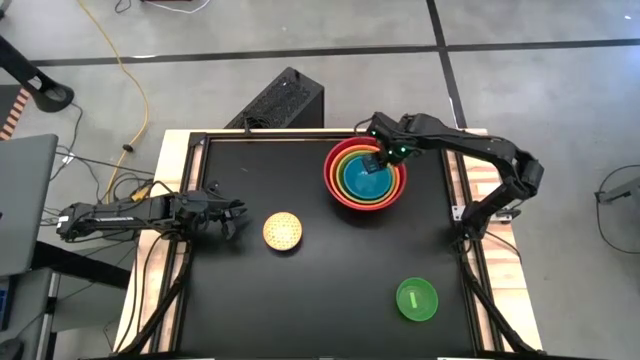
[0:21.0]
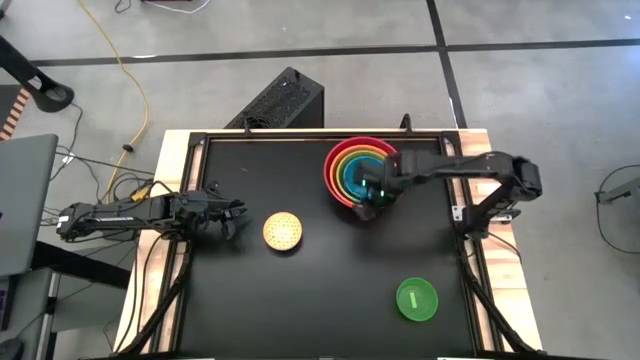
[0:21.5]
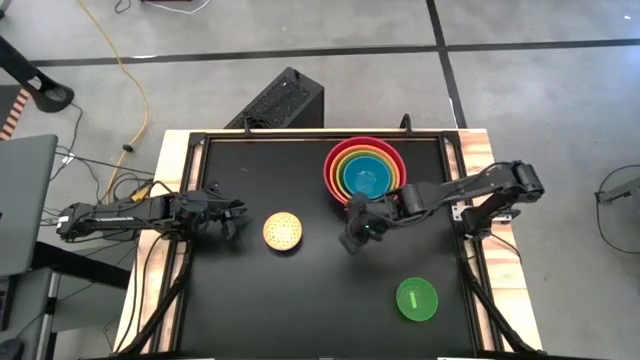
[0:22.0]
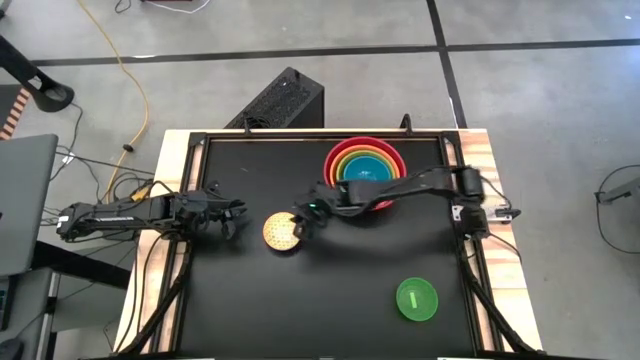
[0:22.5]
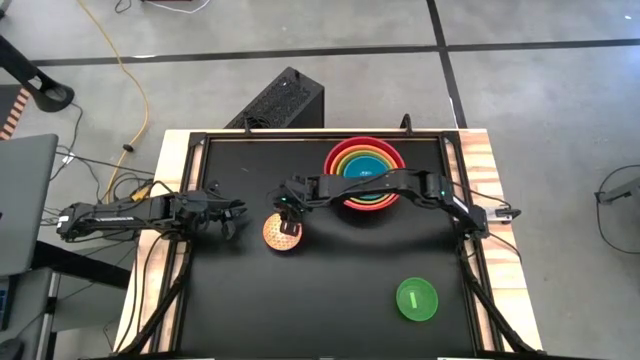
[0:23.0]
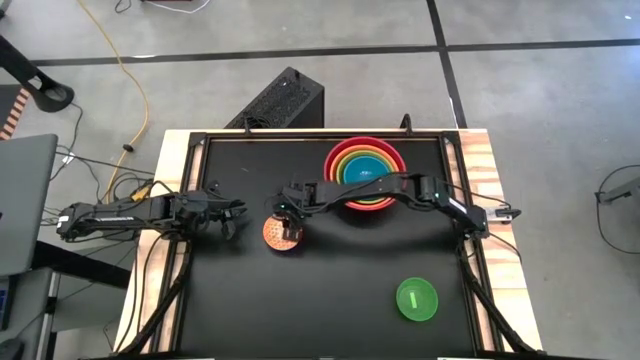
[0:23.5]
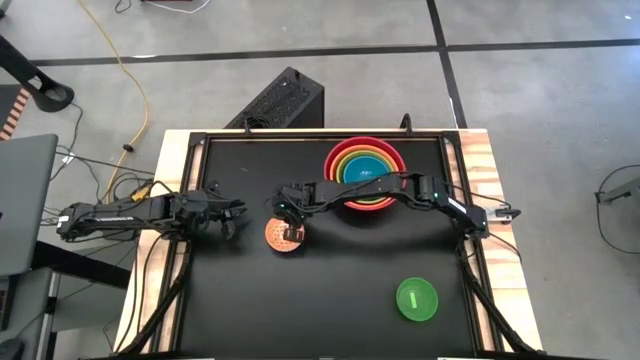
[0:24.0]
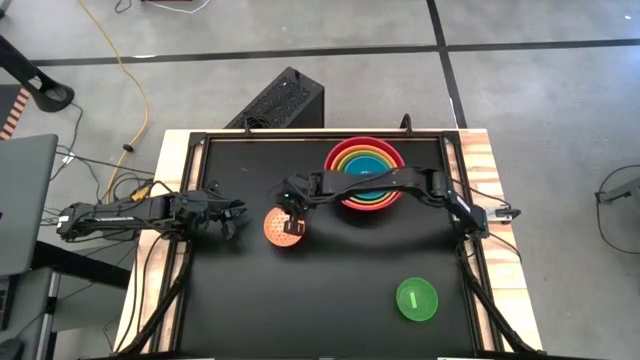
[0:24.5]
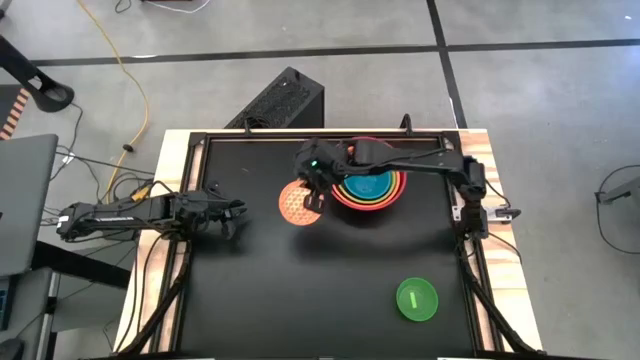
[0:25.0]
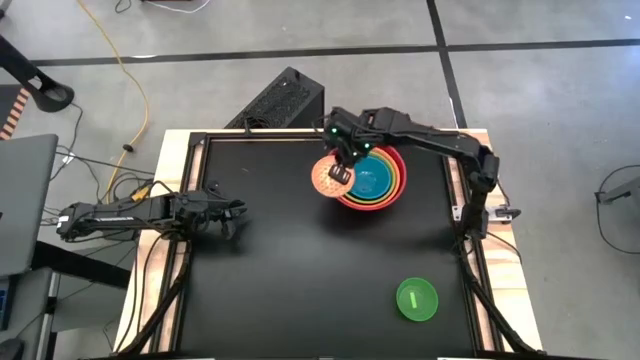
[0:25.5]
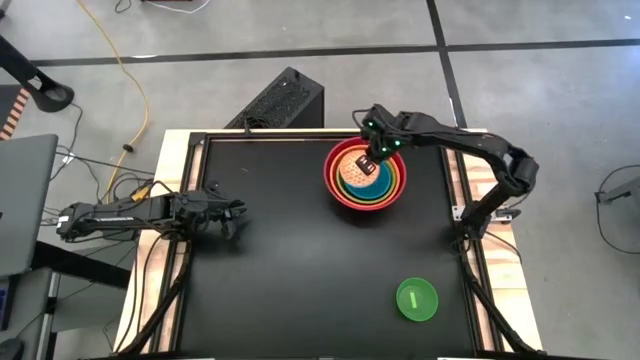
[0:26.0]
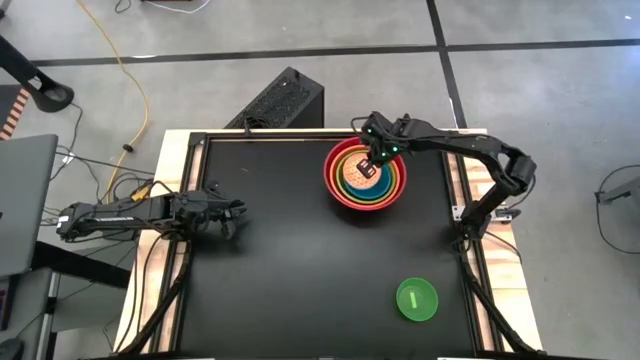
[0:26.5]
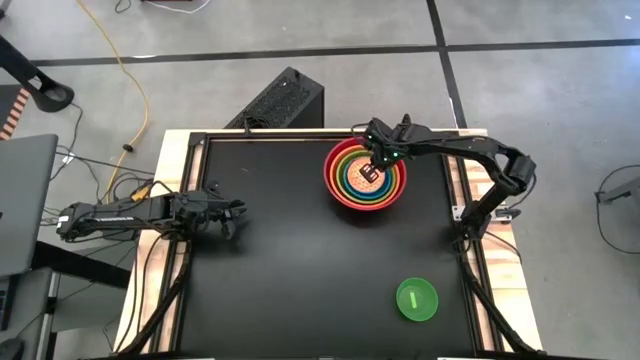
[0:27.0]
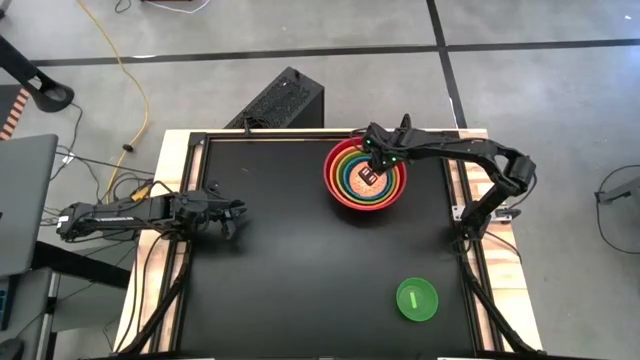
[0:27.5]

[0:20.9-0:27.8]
Stack the orange-patterned bowl on the blue bowl

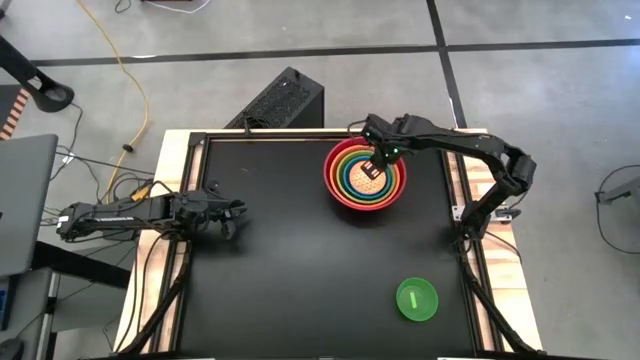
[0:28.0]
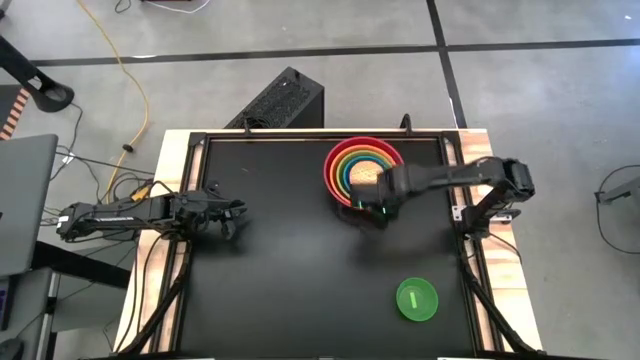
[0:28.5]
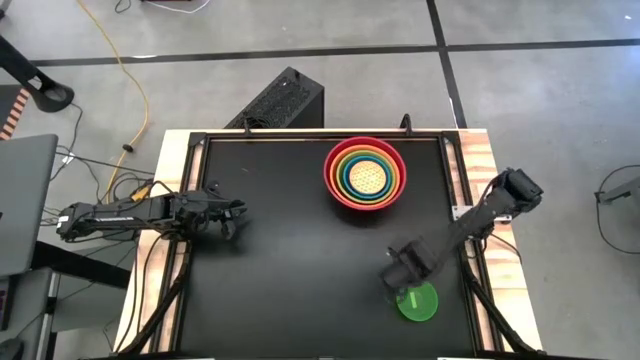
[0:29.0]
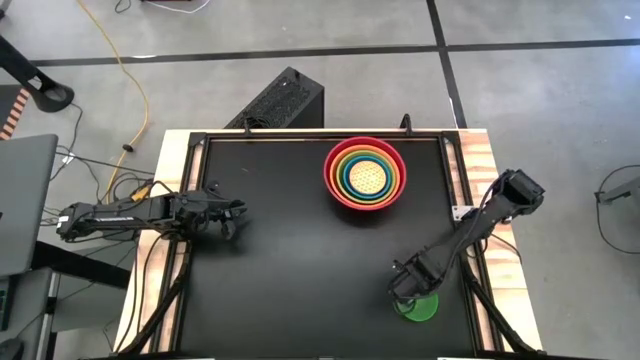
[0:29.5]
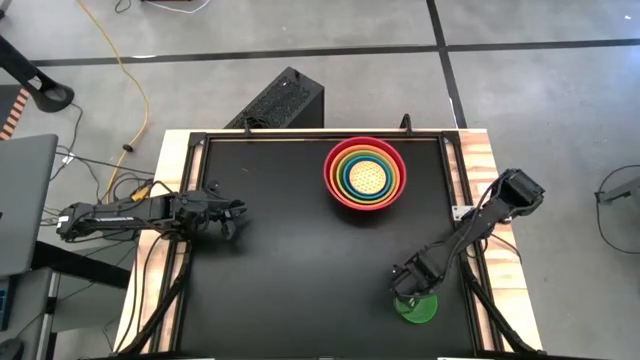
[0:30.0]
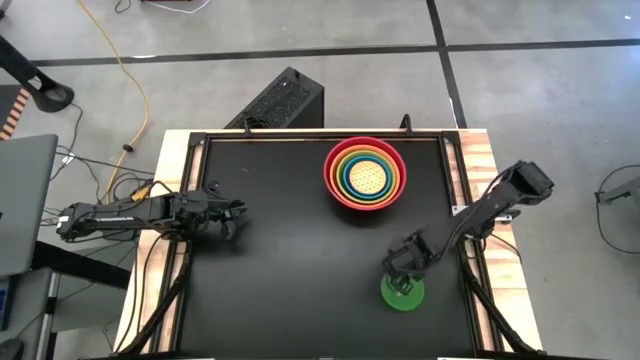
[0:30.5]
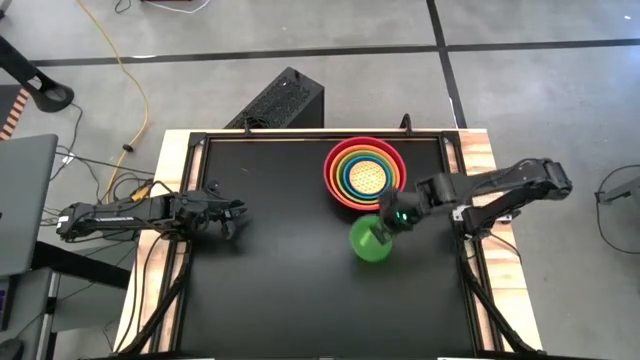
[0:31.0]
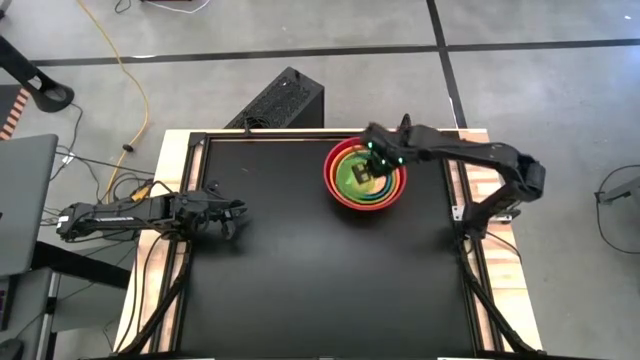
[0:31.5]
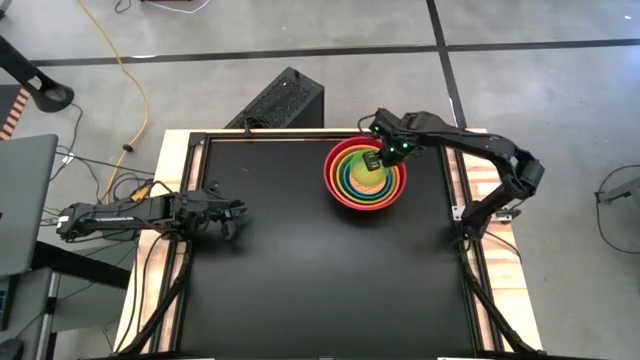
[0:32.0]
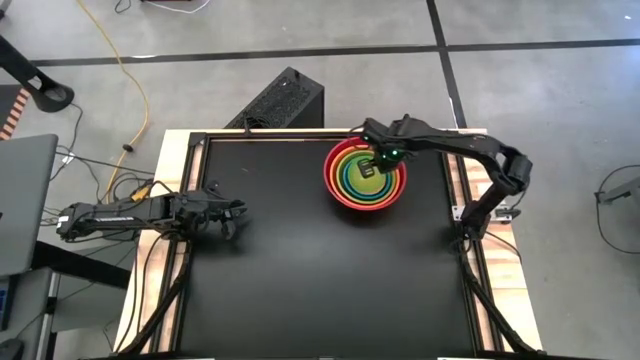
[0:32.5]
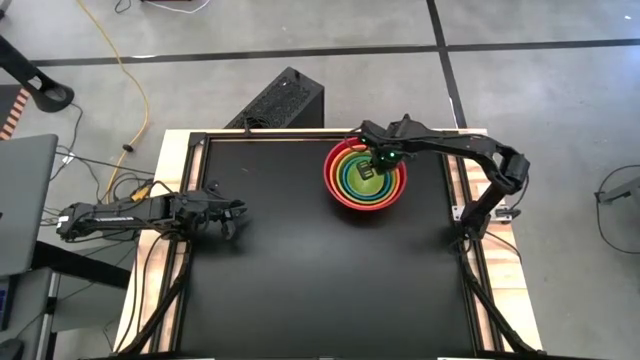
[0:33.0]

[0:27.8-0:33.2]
Stack the green bowl on the orange-patterned bowl

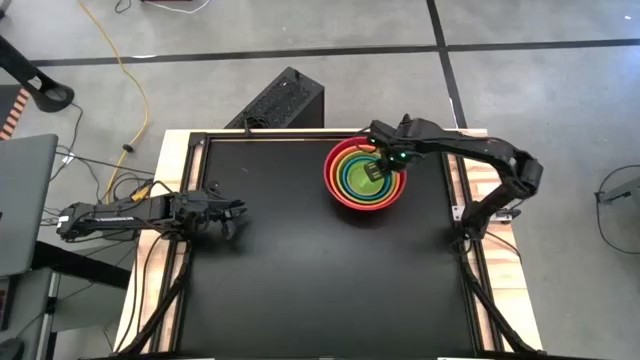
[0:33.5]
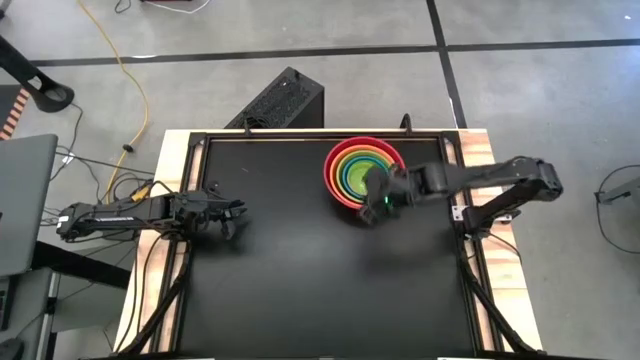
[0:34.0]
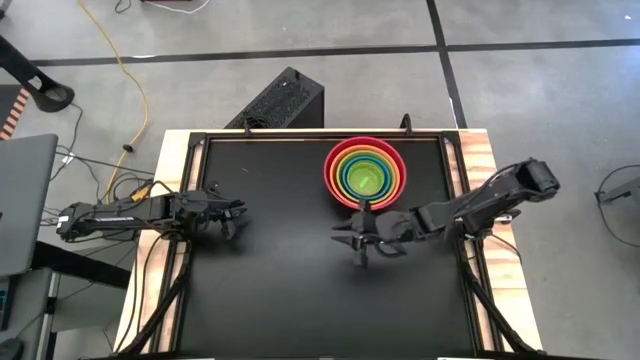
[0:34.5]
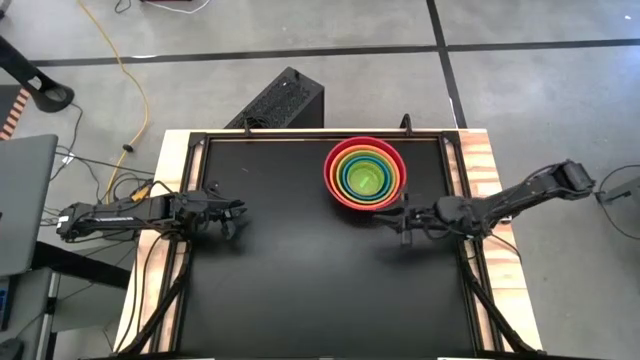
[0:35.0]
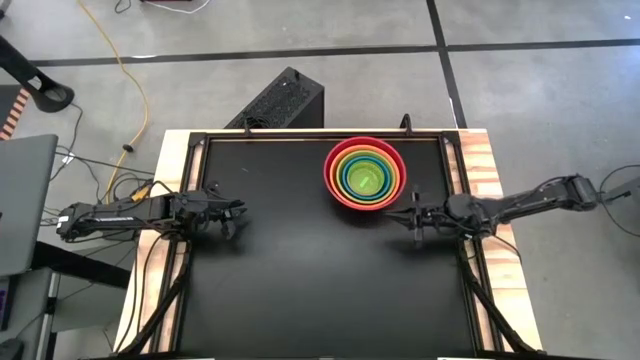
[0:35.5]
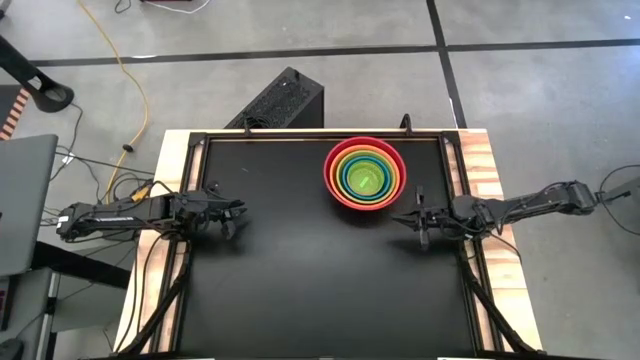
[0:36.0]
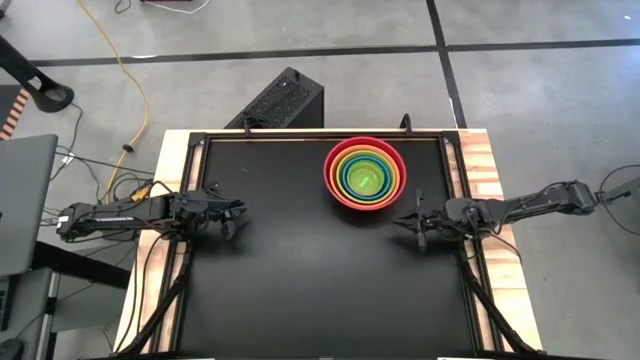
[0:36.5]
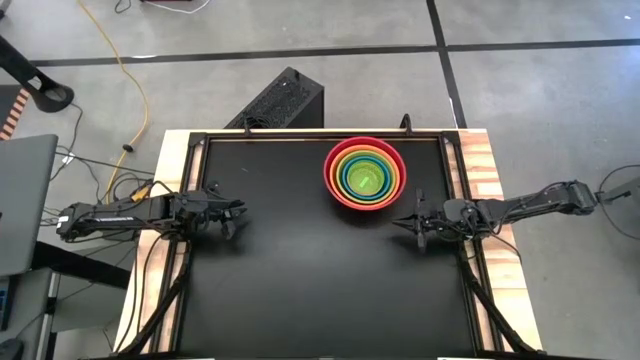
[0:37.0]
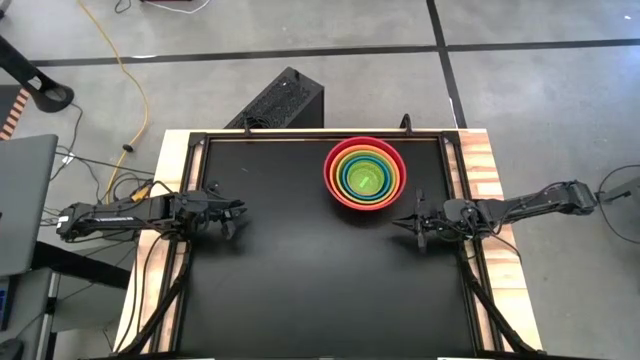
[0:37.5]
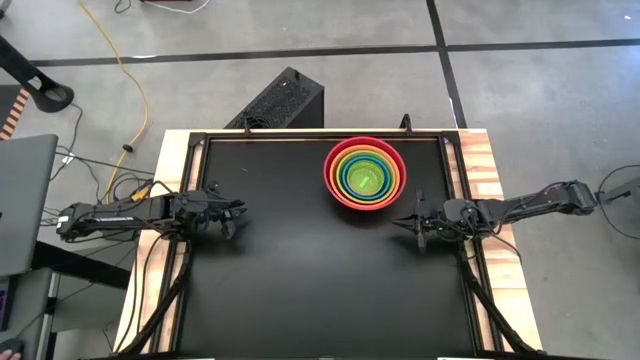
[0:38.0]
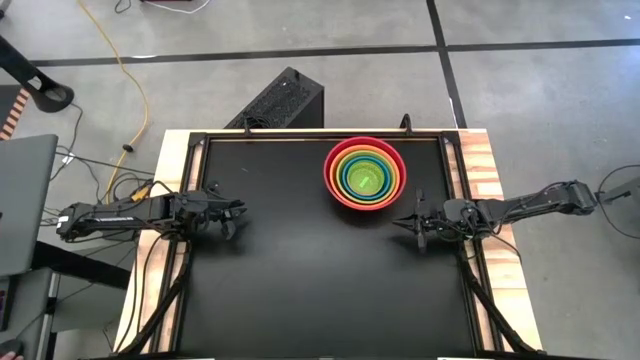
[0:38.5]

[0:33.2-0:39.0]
Return to Home Position
